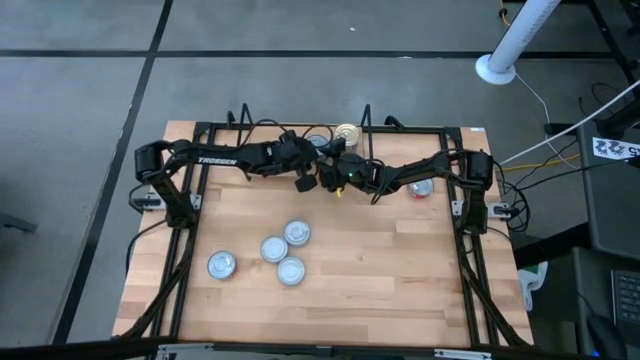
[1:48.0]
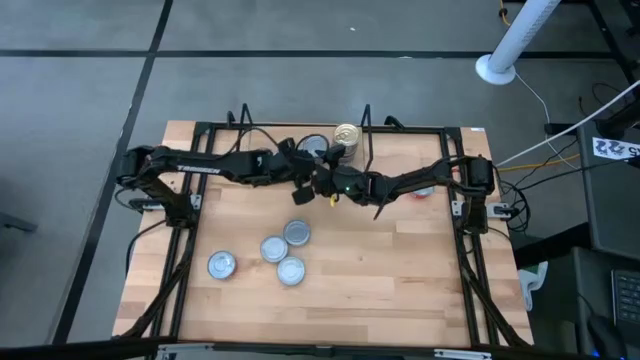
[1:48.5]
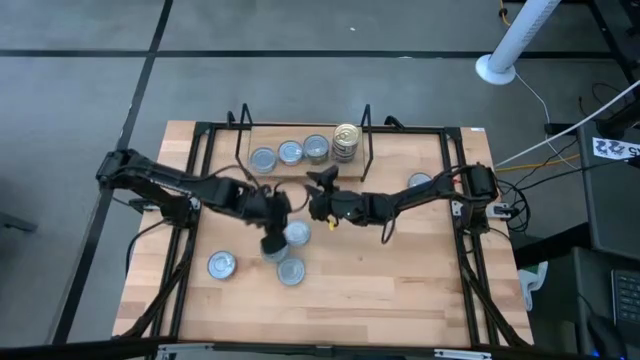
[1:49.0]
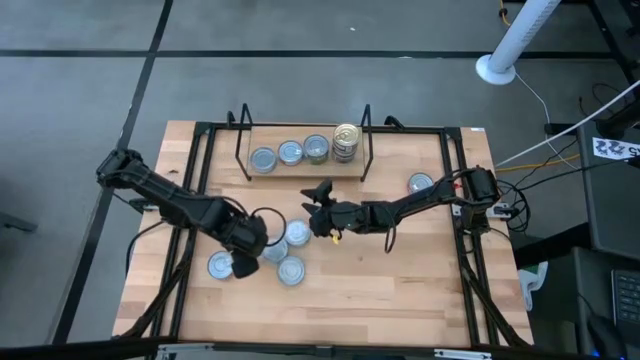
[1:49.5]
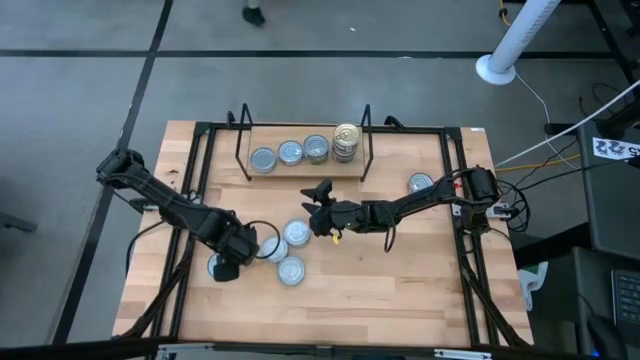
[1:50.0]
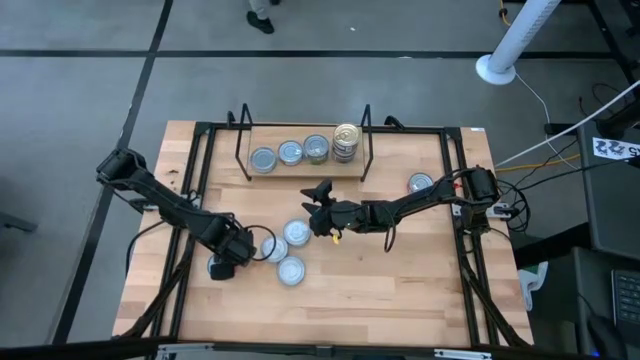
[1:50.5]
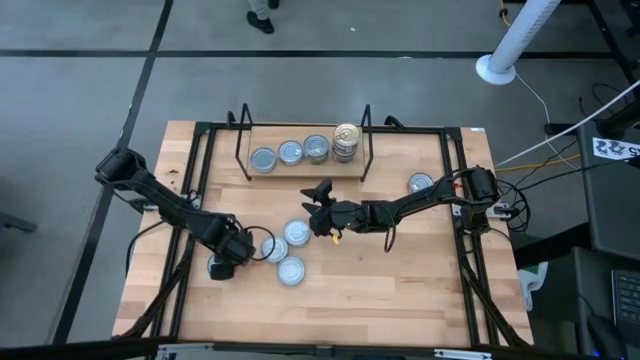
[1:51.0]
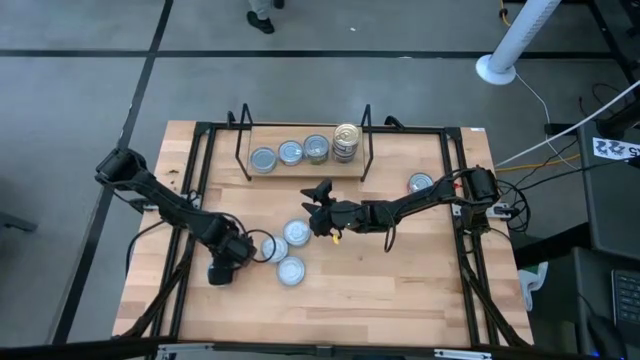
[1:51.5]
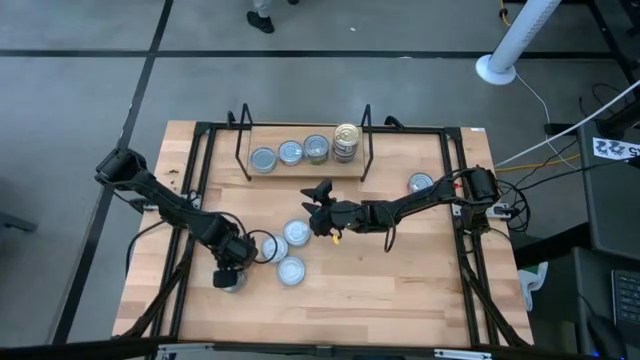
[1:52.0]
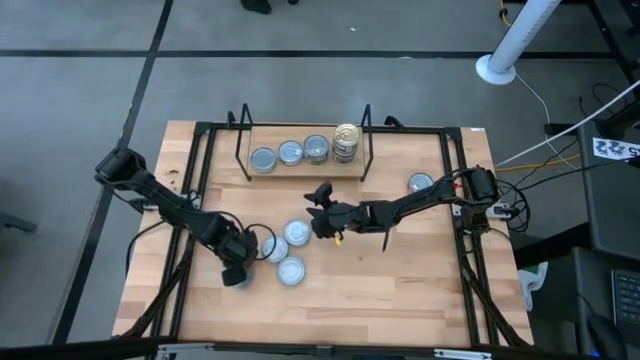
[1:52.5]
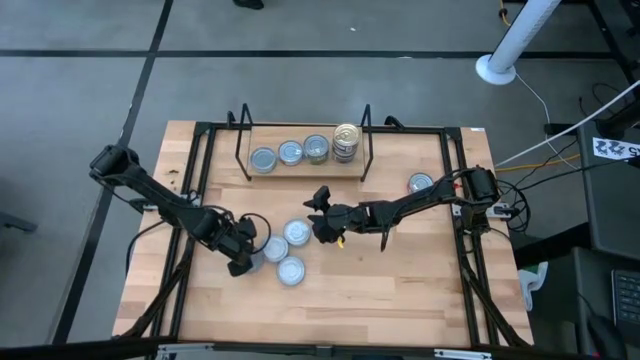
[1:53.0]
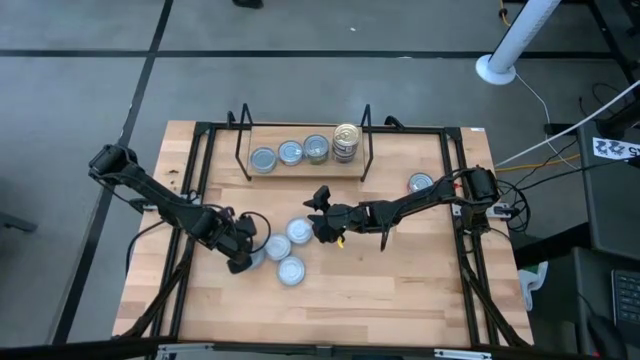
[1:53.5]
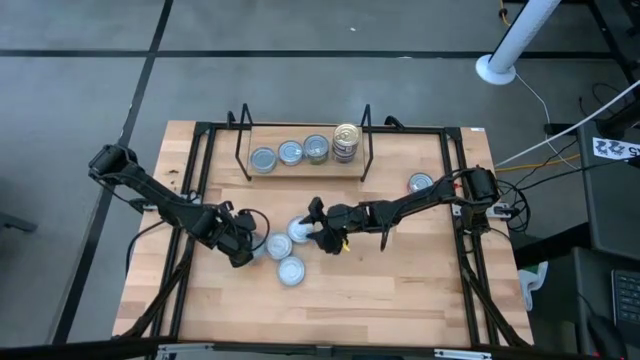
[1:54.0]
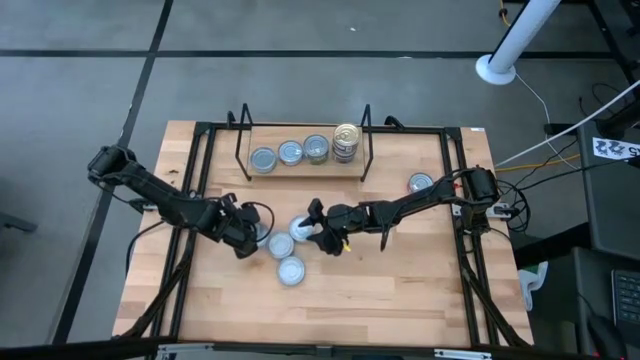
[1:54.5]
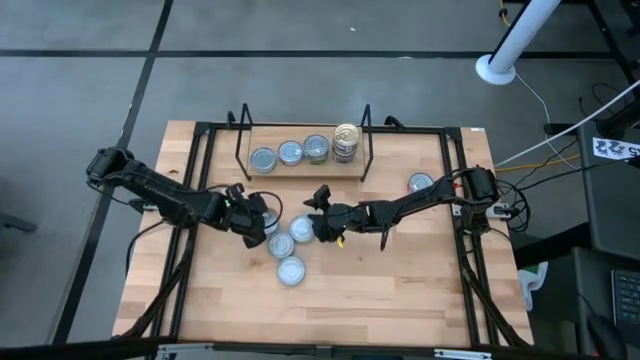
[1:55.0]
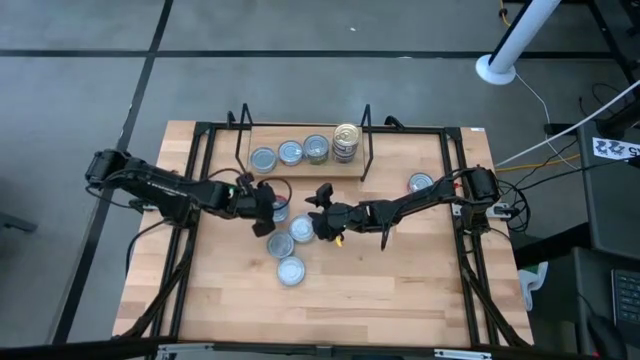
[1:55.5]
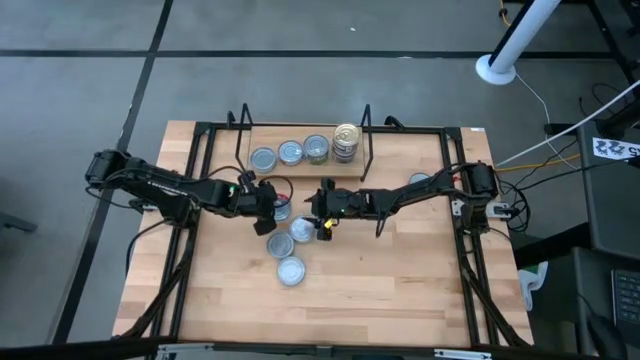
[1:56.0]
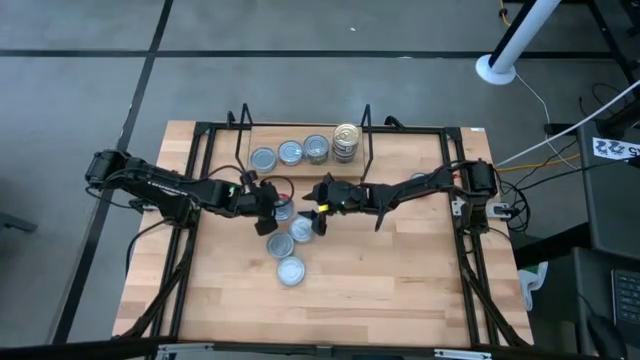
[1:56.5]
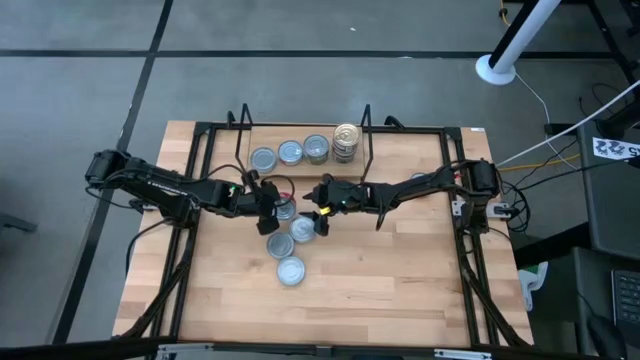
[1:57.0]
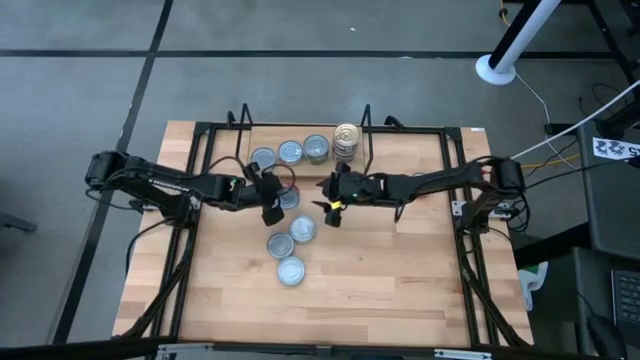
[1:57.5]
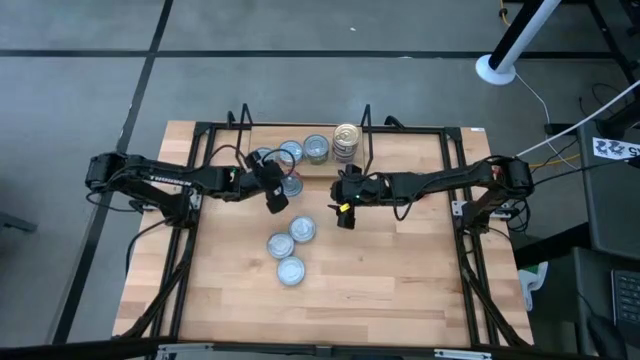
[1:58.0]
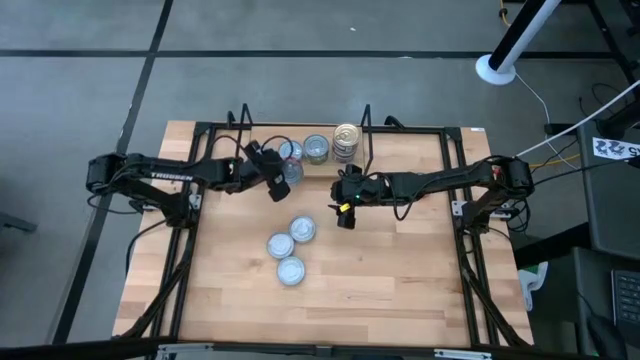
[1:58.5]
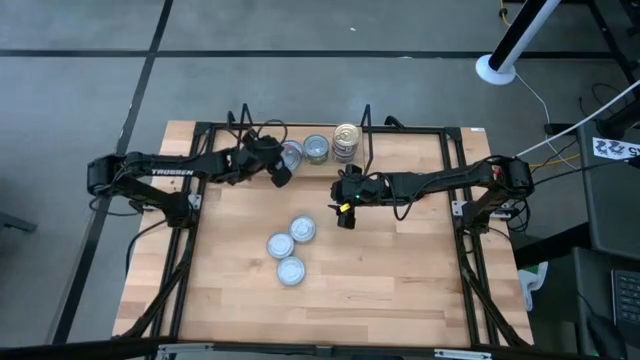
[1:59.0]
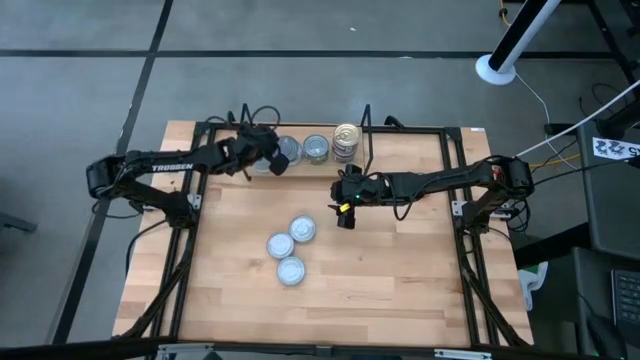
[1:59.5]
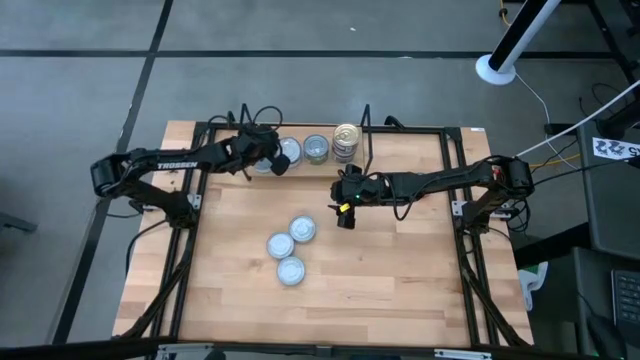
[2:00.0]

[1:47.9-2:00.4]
Task: Stack canned seafood by type on shelf
Stack the red tuna can on top of the red tuna can on the shelf

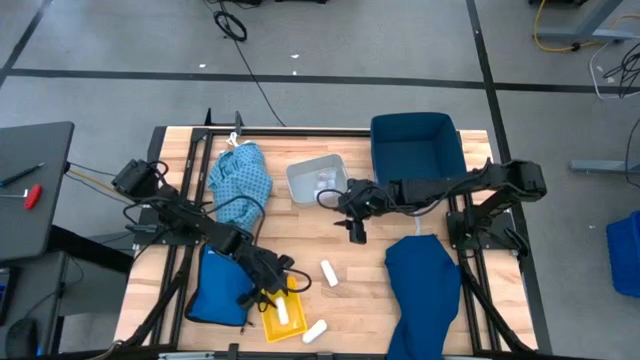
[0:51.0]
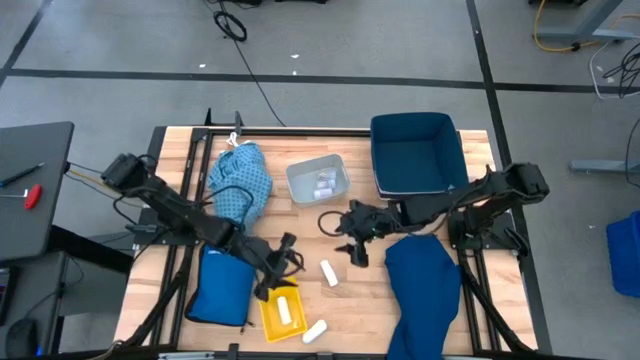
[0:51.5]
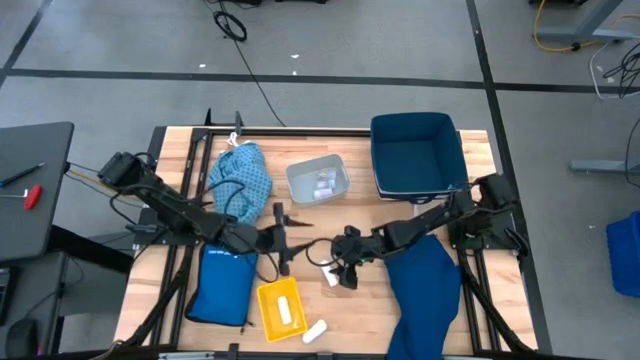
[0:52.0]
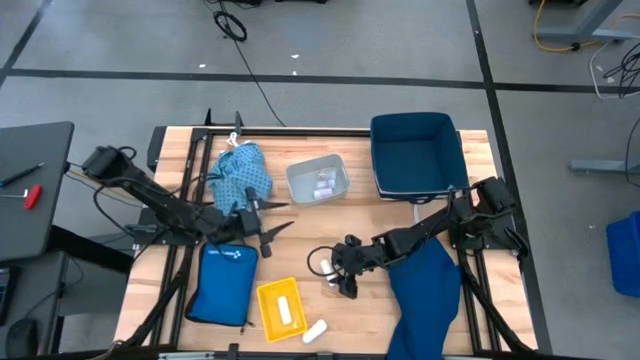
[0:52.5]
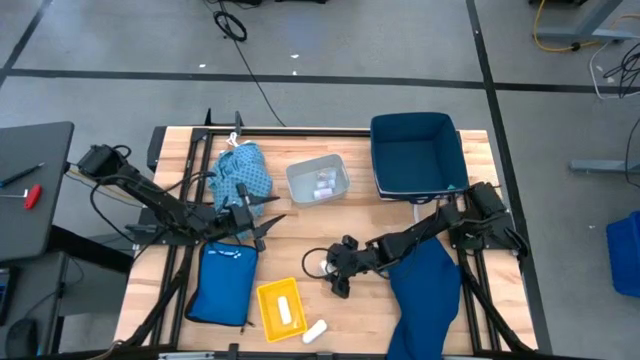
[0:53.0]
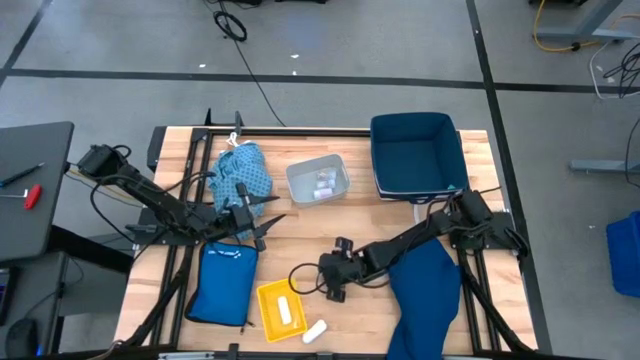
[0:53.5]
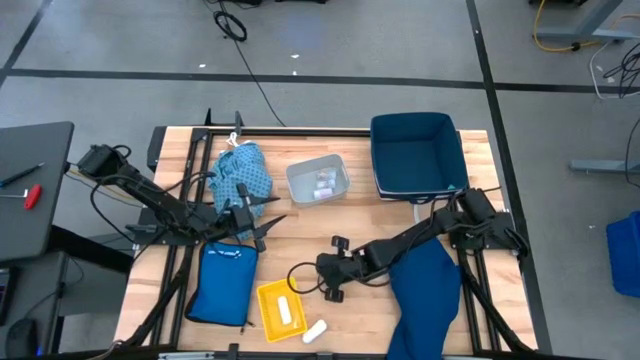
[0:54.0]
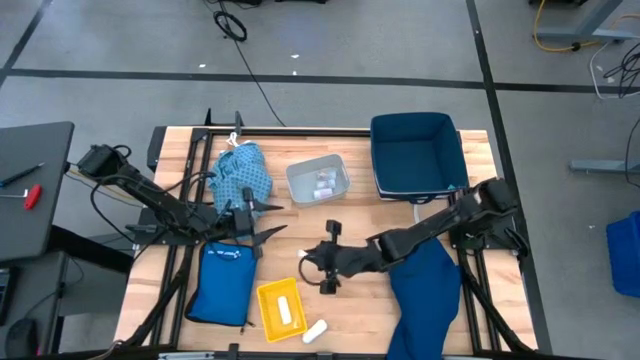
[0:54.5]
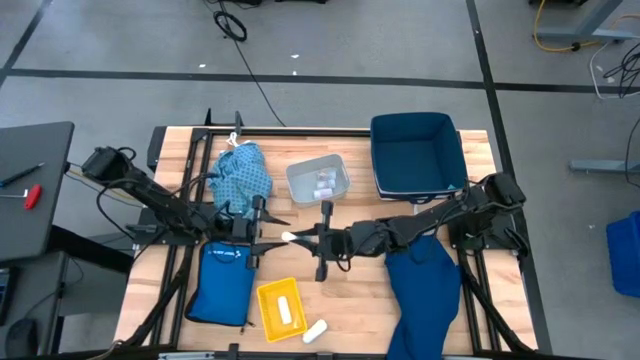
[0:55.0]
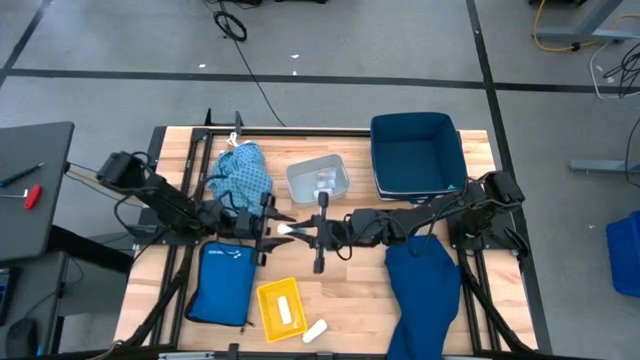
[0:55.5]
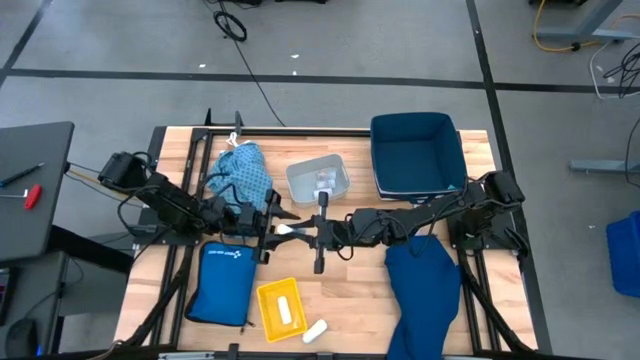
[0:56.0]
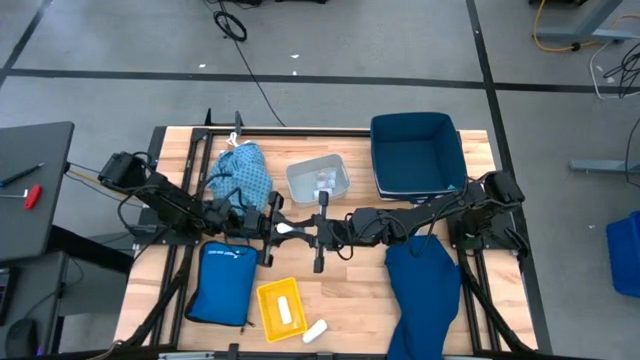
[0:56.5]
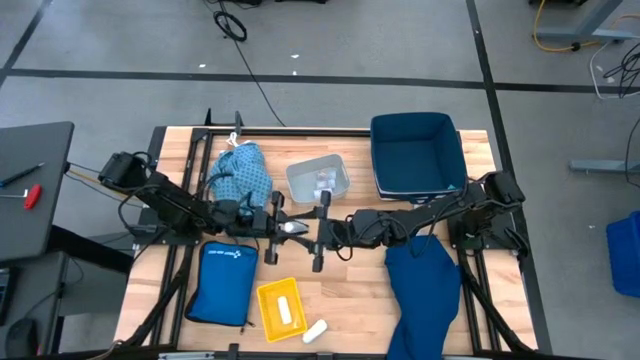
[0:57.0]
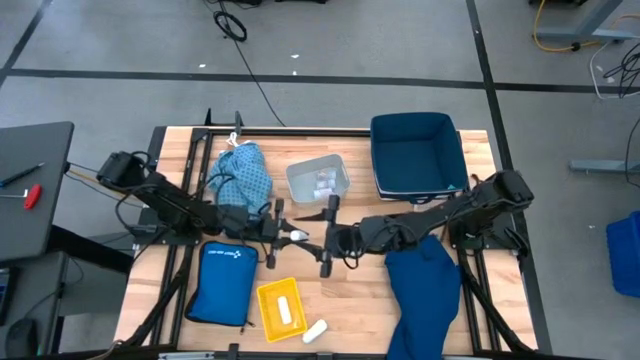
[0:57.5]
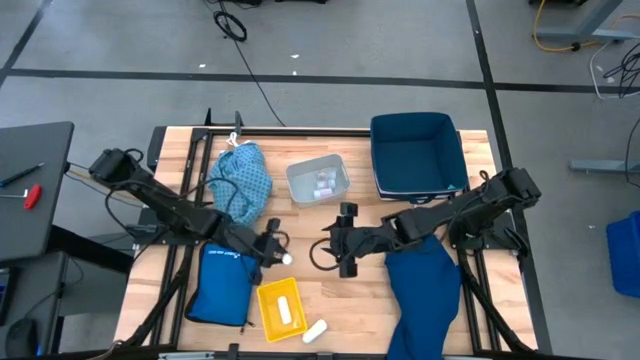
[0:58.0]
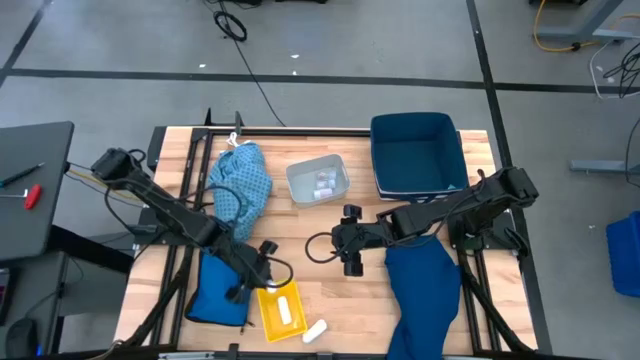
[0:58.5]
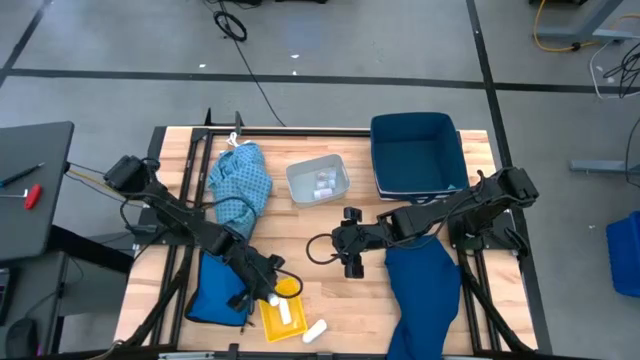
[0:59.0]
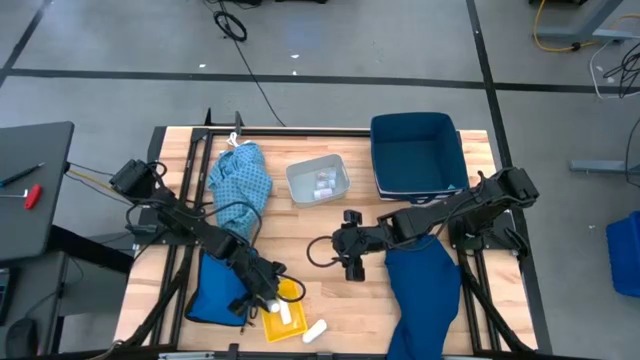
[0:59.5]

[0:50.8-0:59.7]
Task: Pick & place medical supplies in basket/bin
Put the top rolled gauze into the yellow bin
